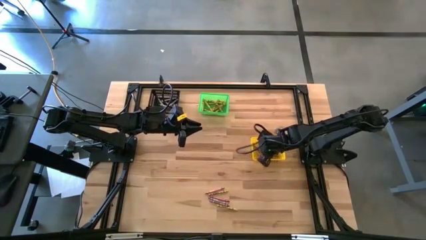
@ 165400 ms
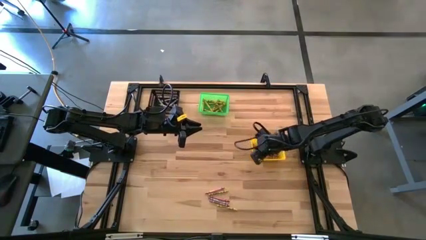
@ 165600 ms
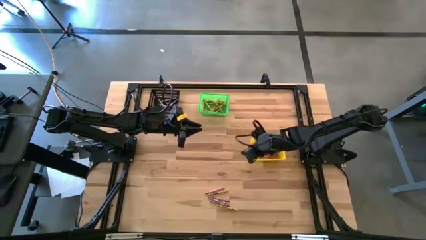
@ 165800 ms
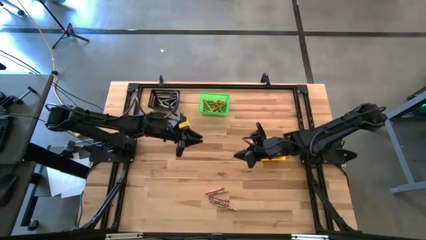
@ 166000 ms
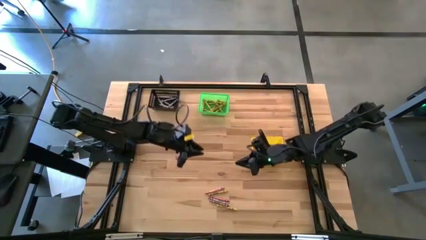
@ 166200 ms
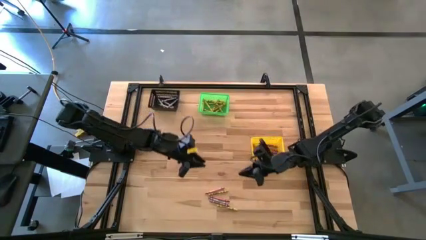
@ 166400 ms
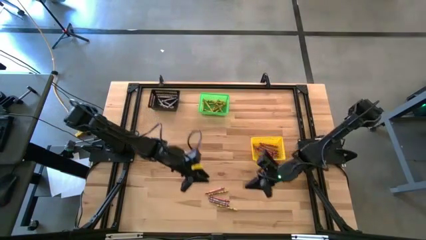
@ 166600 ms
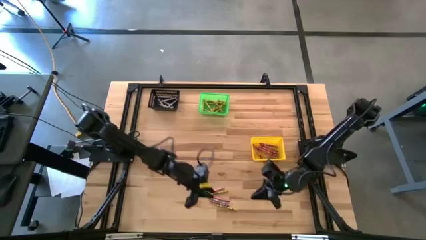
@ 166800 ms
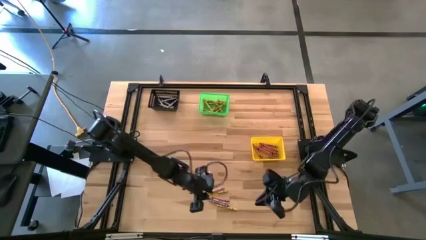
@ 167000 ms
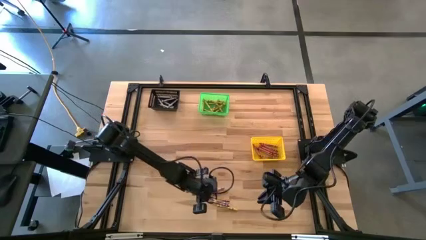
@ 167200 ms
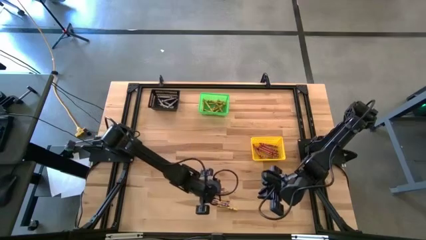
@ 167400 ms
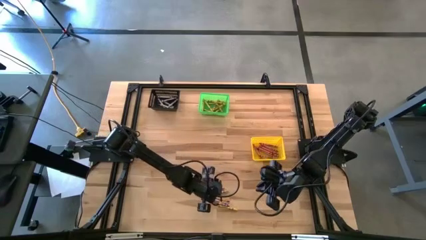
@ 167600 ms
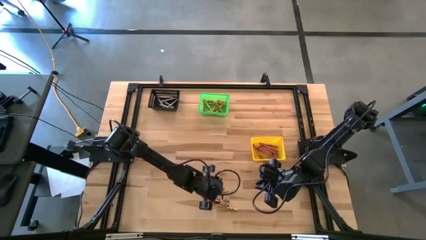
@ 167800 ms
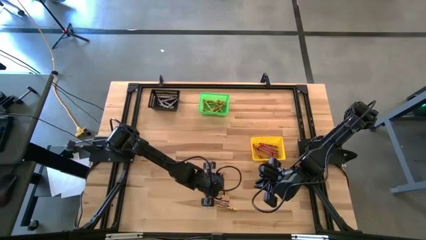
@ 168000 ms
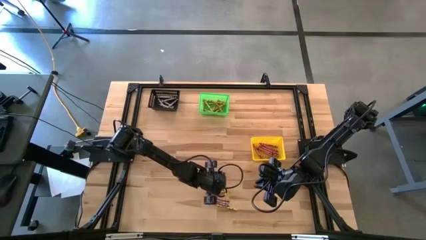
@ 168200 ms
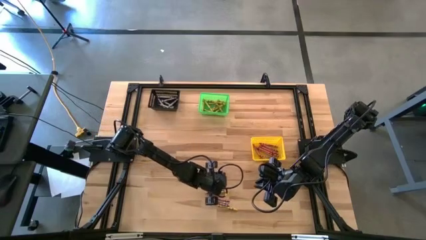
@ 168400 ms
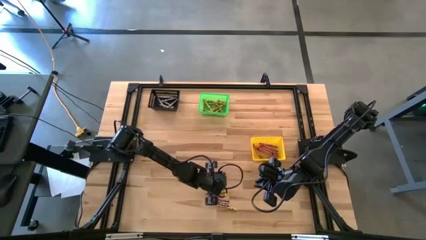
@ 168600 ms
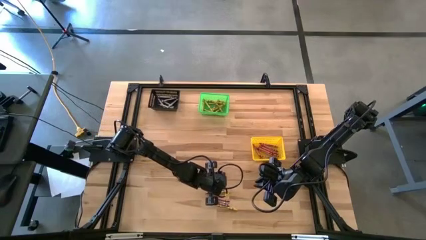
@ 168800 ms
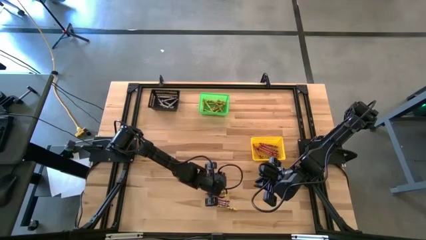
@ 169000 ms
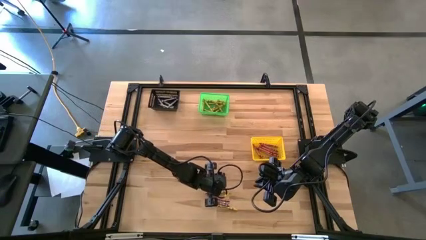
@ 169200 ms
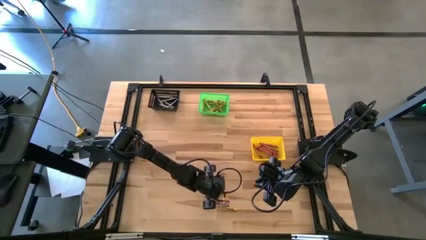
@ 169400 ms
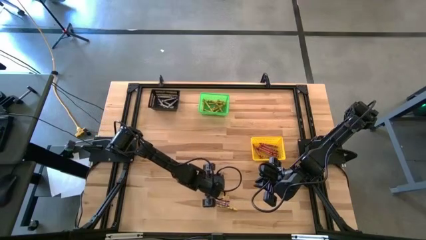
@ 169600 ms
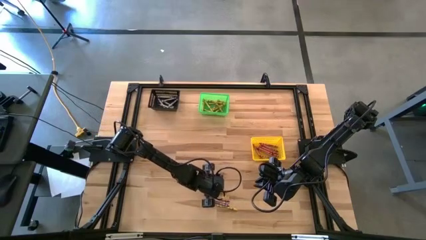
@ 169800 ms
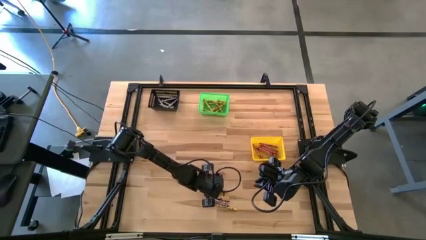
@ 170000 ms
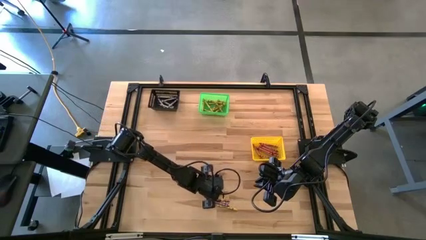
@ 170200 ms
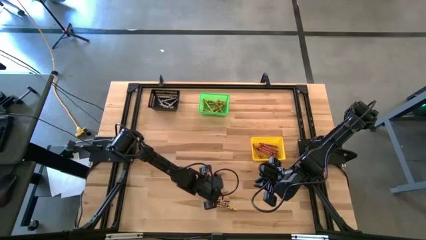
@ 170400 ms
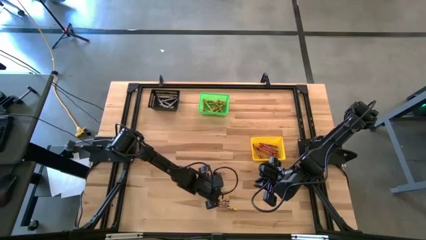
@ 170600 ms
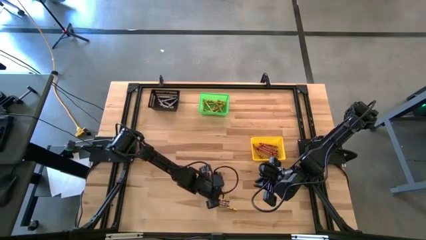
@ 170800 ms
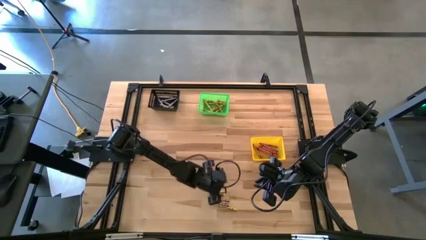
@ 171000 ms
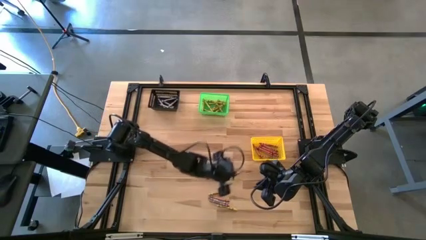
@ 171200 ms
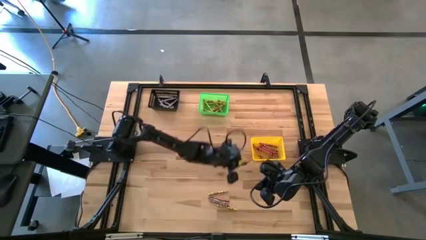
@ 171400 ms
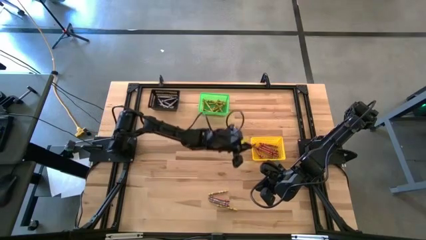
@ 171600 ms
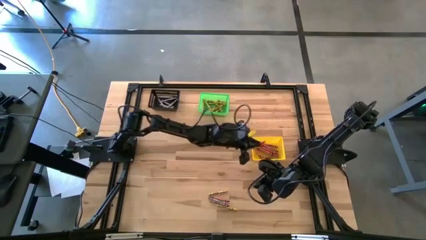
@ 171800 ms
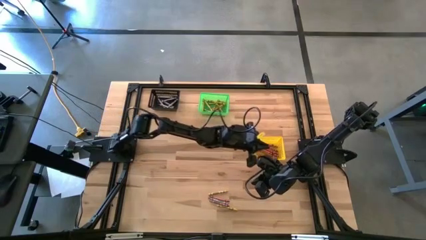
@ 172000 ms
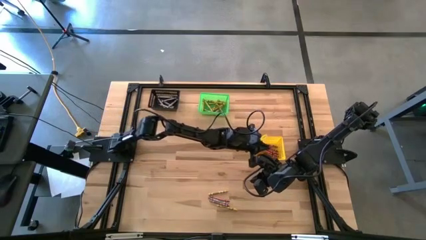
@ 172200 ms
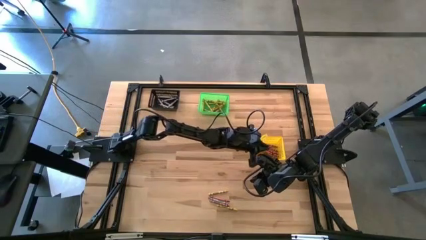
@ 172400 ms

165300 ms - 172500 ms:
Task: Sort crayons
Put the red crayon into the yellow basket

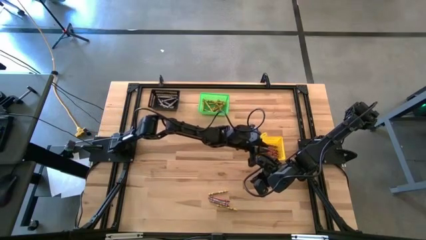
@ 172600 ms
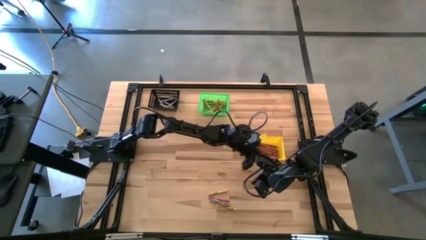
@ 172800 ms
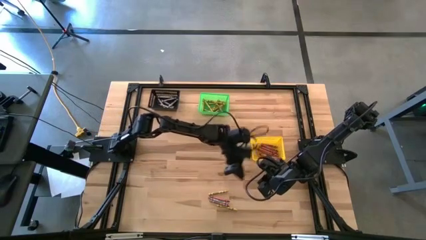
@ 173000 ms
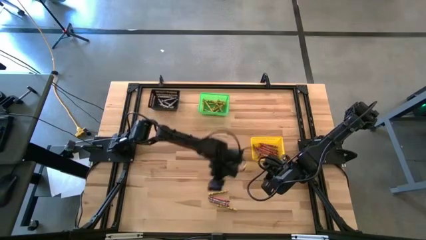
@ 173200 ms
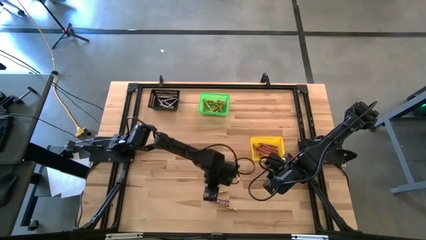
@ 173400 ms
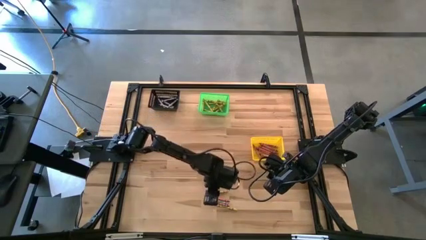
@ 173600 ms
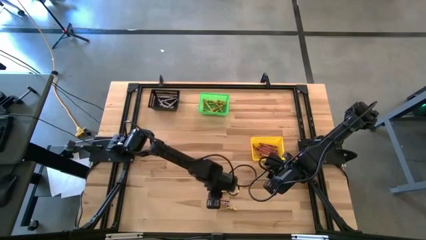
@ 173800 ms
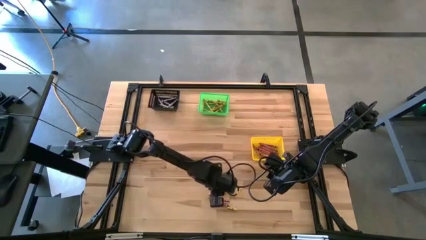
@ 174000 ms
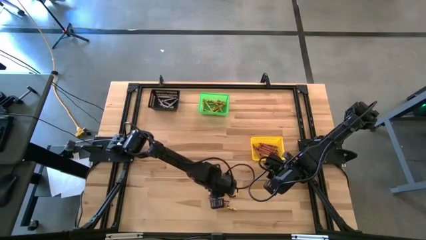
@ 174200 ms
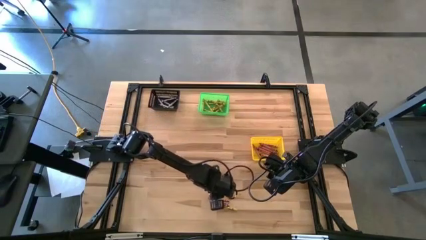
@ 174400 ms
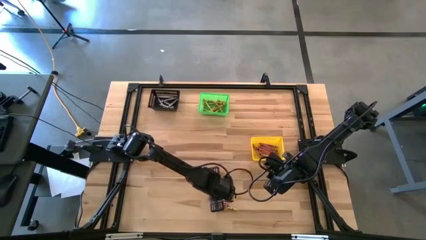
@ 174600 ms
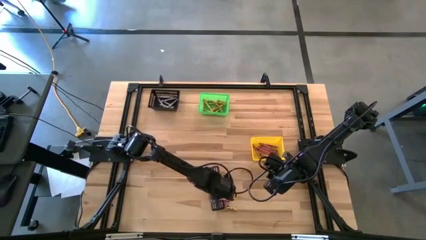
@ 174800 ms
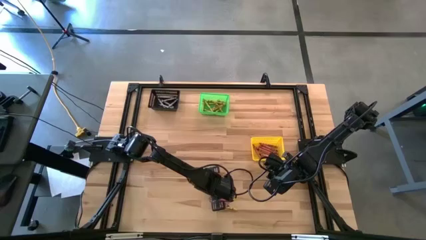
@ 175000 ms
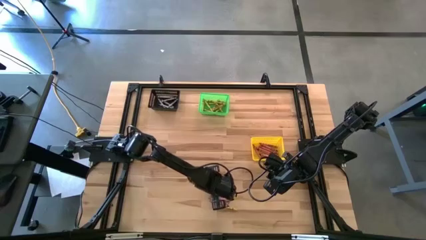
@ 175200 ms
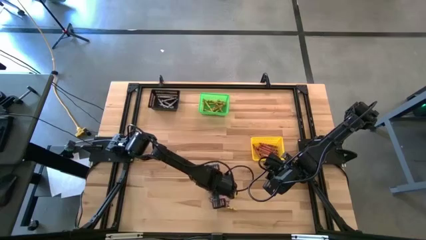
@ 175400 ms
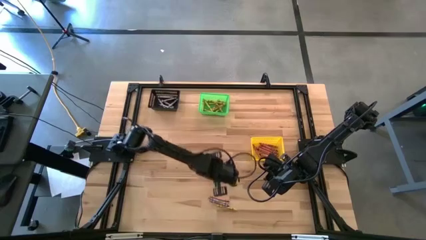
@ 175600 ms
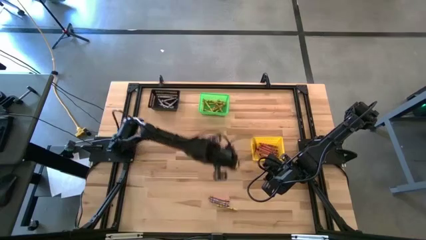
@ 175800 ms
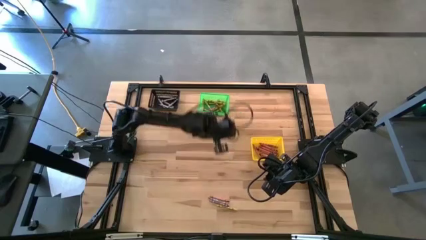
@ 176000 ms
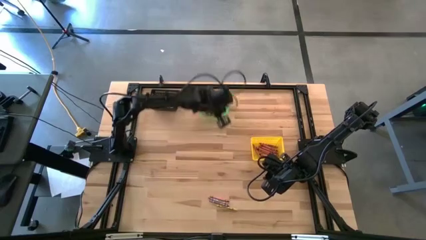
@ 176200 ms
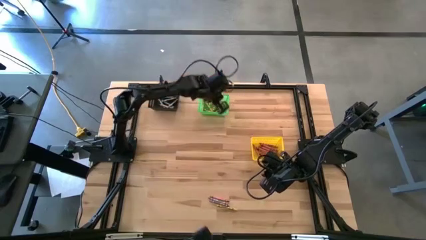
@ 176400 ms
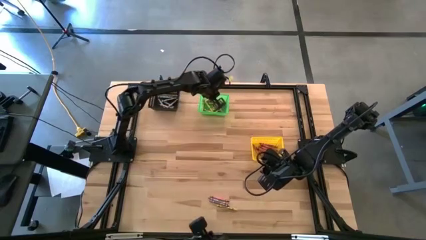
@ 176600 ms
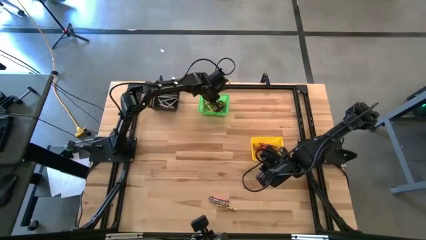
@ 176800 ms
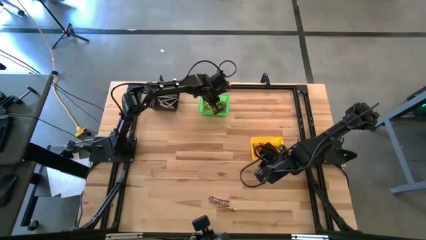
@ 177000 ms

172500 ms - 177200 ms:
Put the yellow crayon into the green basket

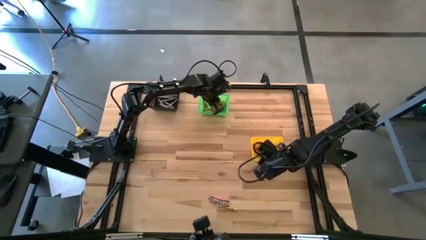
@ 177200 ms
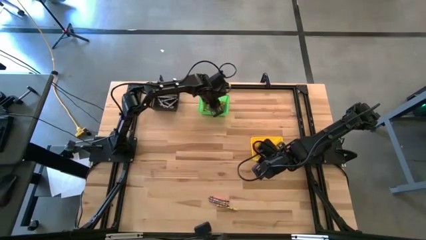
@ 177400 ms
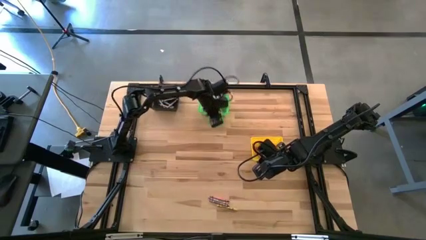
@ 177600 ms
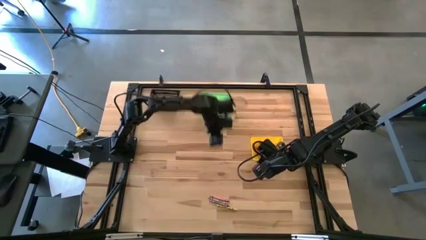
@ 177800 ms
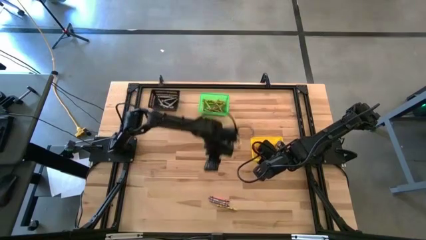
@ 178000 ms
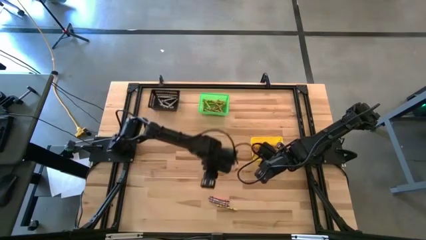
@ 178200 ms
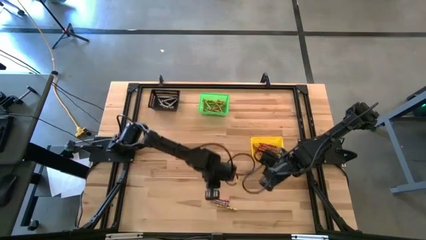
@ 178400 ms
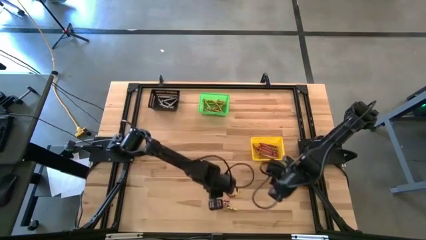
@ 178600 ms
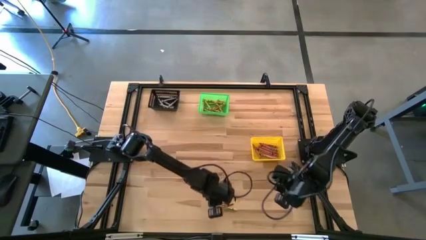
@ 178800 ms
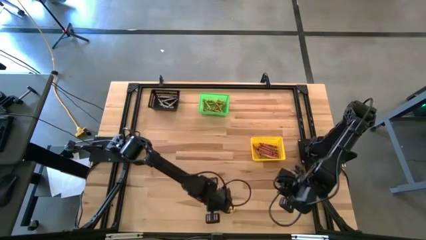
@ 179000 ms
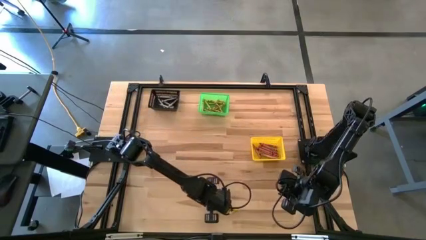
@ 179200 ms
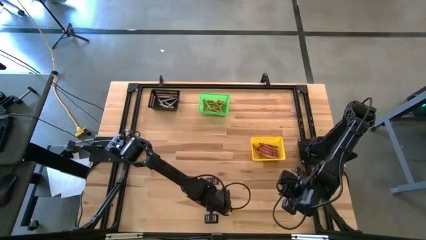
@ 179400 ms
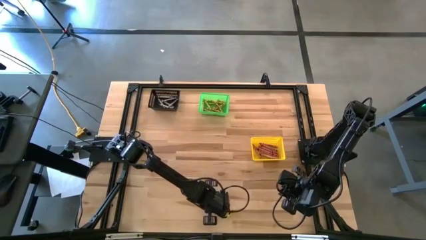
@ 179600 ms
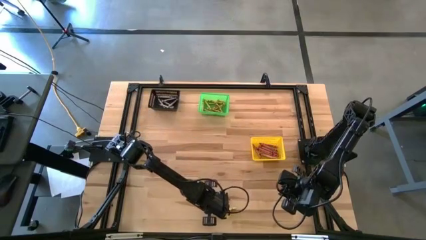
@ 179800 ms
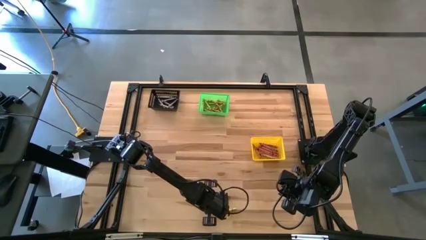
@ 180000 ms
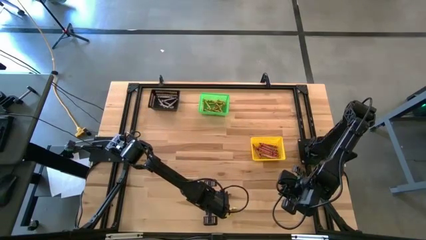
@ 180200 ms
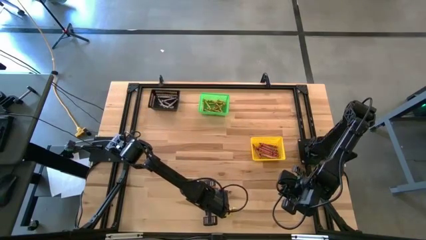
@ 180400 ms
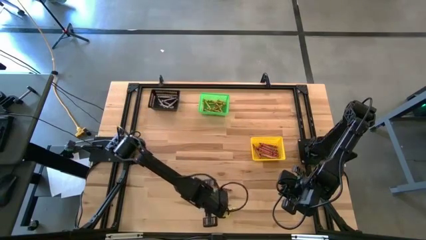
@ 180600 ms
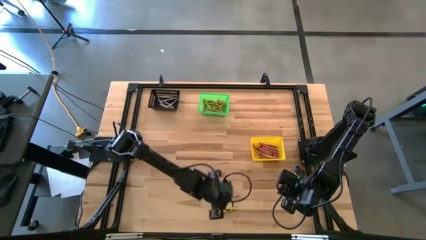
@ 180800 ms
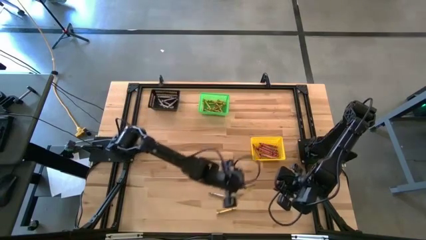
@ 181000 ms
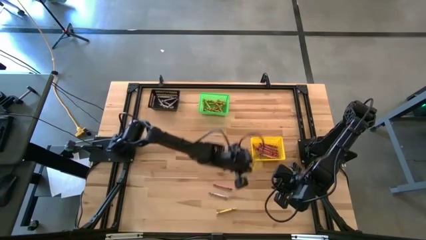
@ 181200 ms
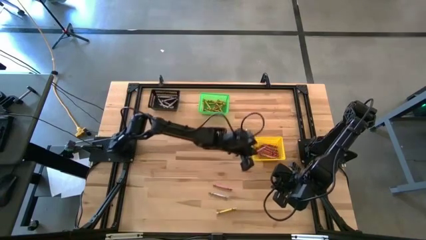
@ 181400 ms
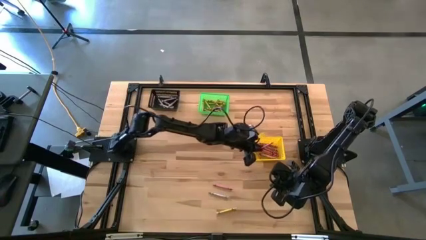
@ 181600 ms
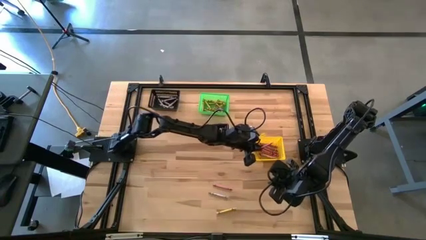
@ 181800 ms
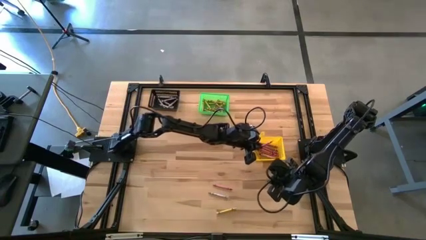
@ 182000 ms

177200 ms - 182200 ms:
Put the red crayon into the yellow basket

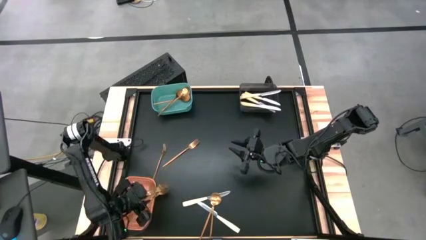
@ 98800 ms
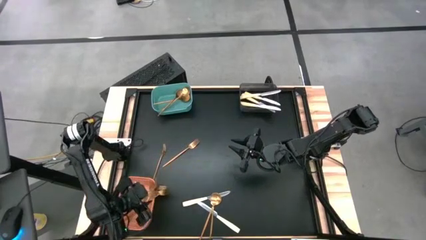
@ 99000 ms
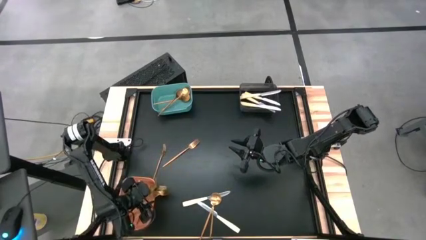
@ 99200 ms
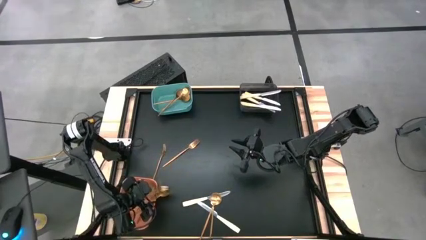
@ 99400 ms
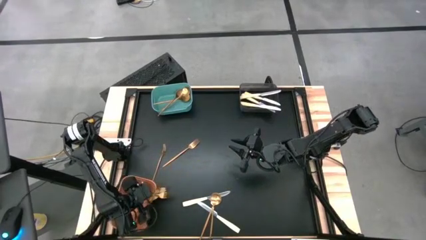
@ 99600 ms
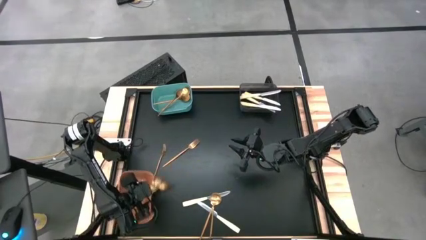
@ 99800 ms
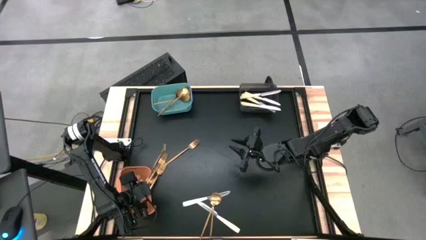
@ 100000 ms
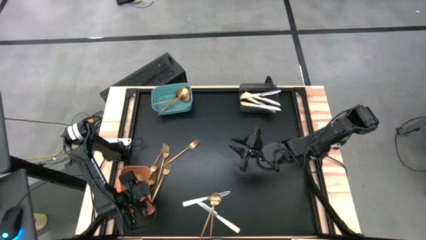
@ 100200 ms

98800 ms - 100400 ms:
Task: Sort silverware by color (type)
Adjust the gold forks in the orange bin
